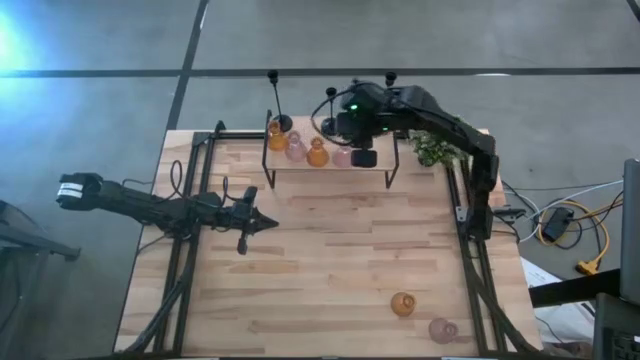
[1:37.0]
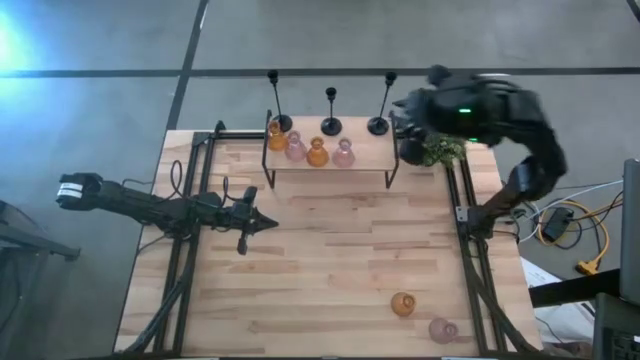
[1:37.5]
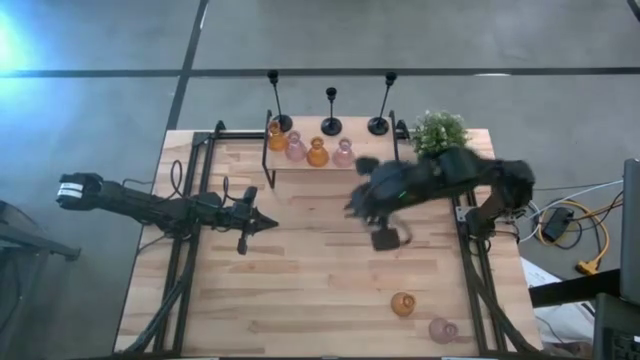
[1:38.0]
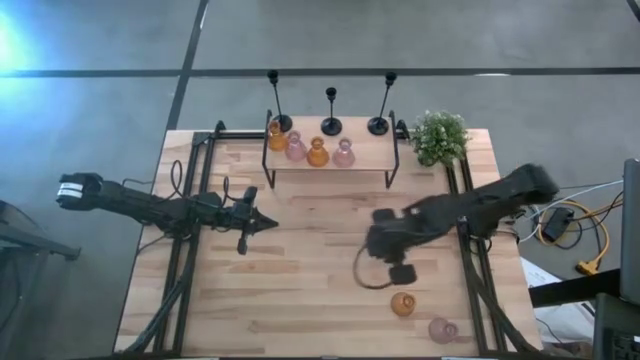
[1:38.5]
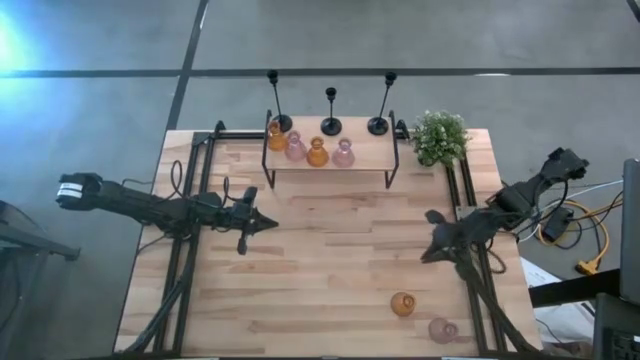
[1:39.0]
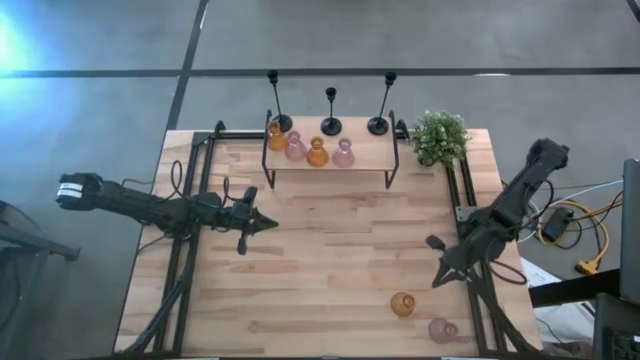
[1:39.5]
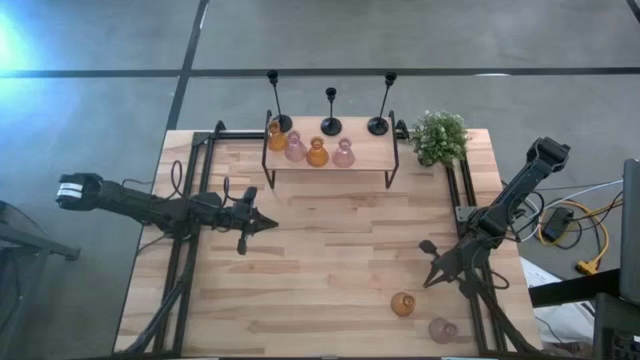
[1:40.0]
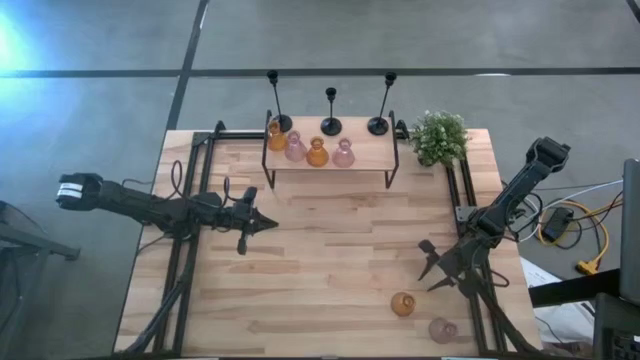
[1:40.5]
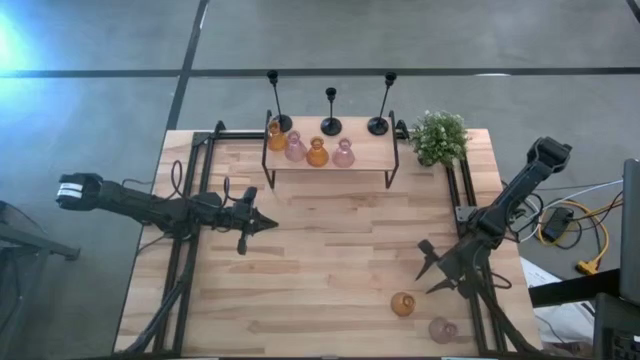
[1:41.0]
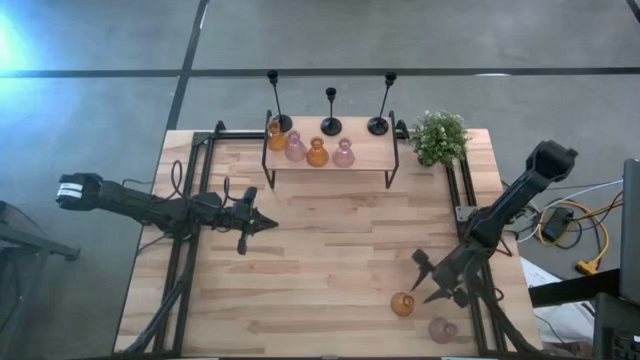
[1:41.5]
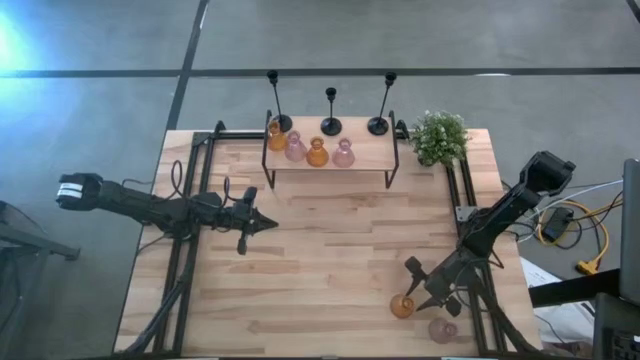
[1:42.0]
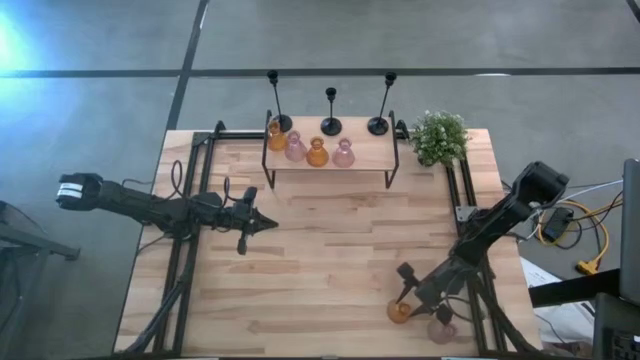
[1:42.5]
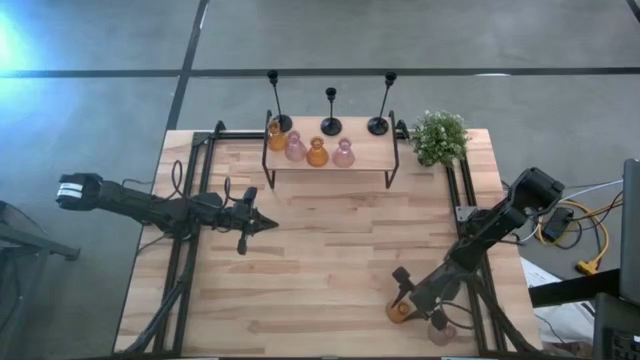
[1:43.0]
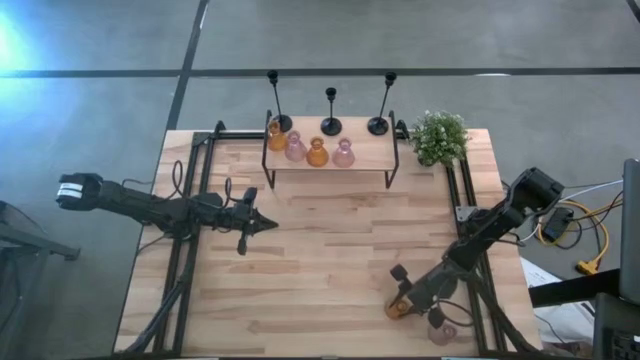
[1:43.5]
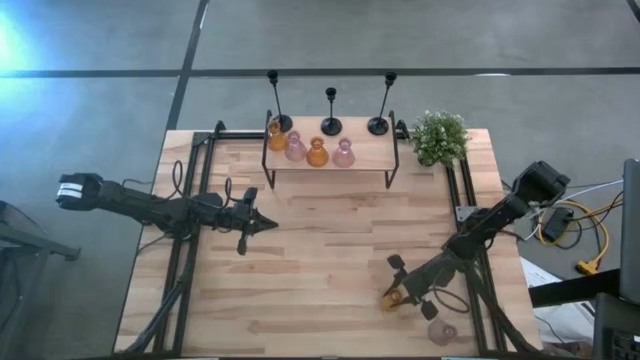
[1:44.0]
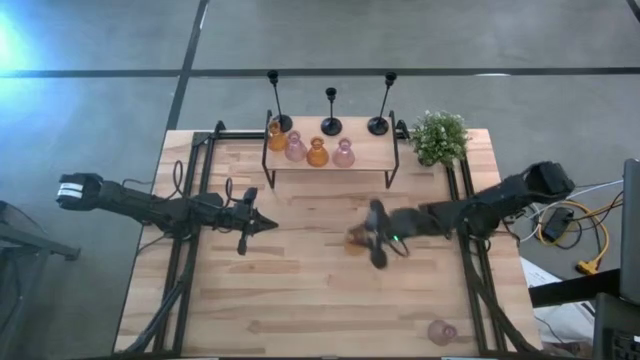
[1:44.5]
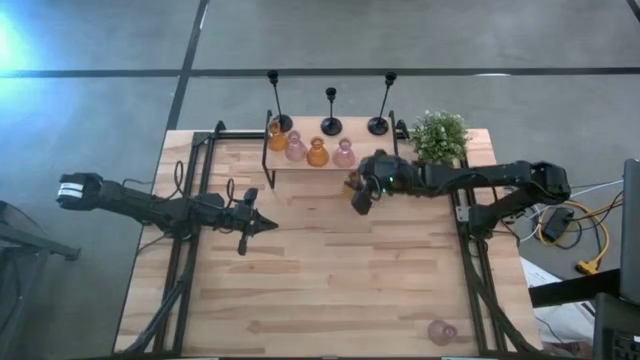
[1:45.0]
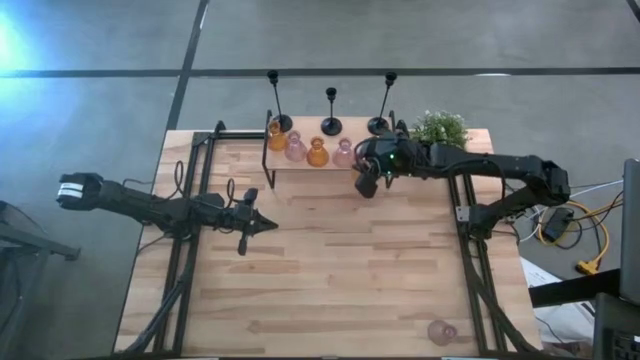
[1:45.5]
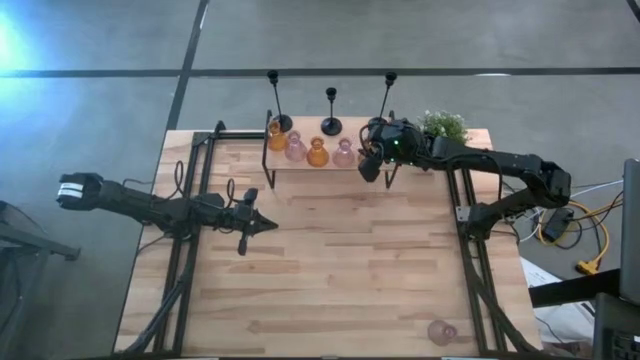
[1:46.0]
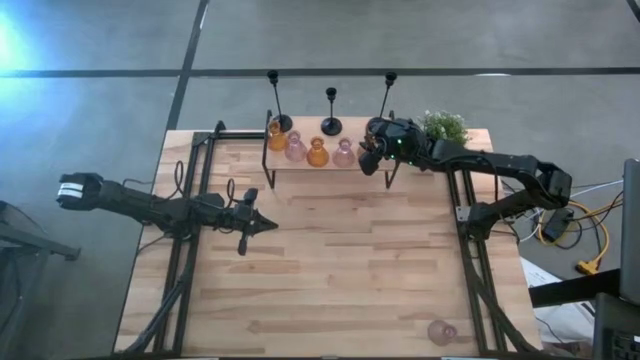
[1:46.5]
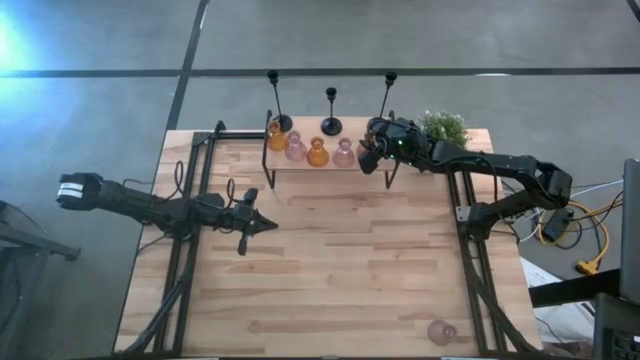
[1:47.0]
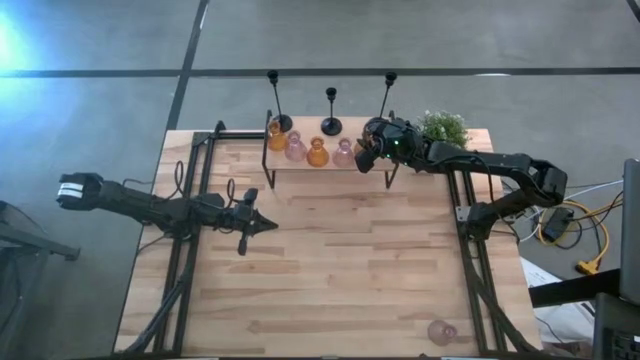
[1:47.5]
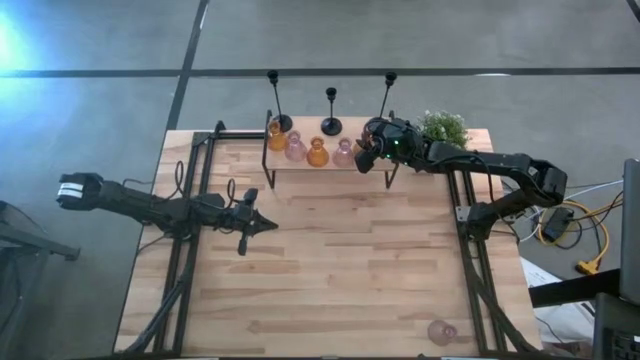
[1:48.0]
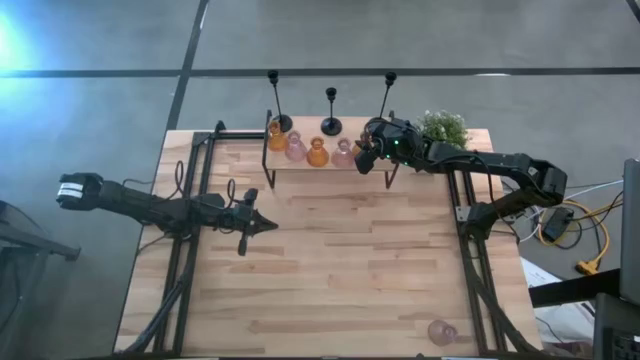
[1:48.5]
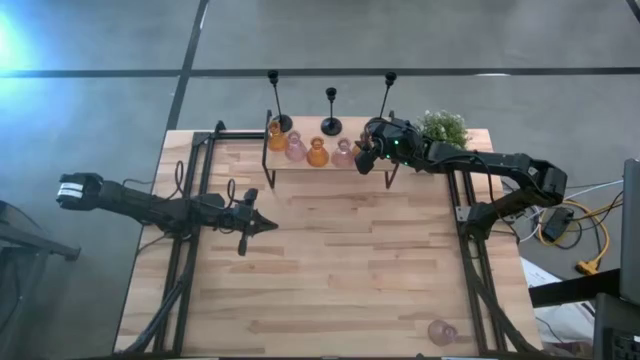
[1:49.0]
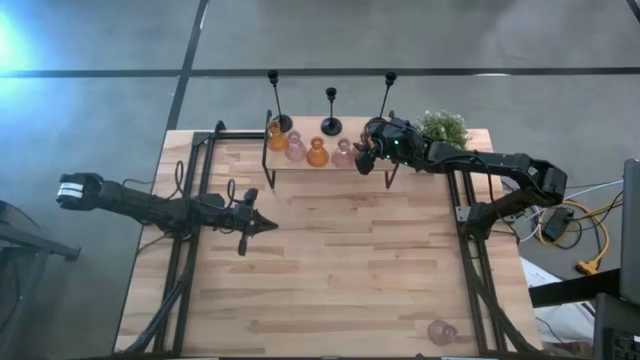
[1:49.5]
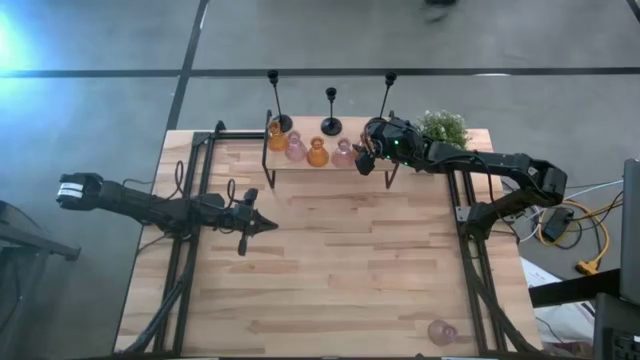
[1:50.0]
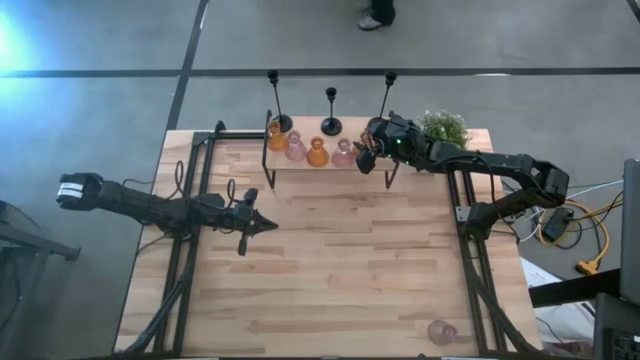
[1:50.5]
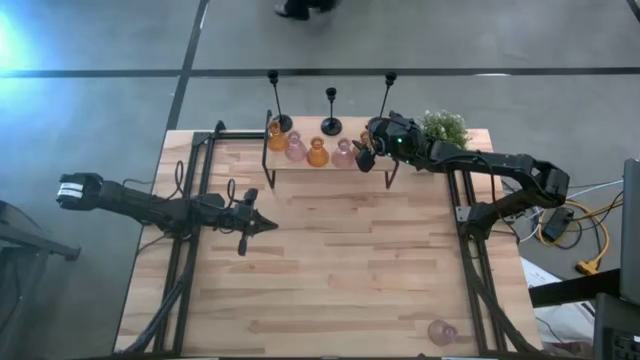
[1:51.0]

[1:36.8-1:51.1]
Task: Pick & Place candle stick holders
Put the orange glass candle holder on the shelf

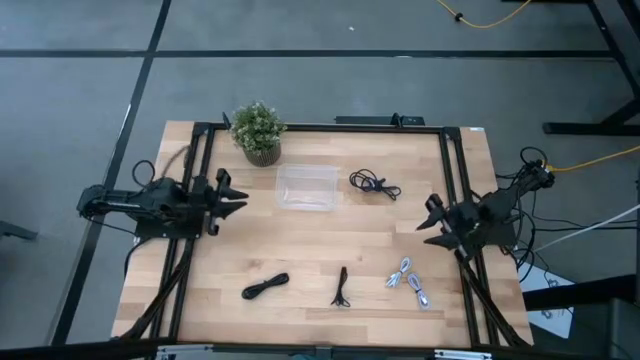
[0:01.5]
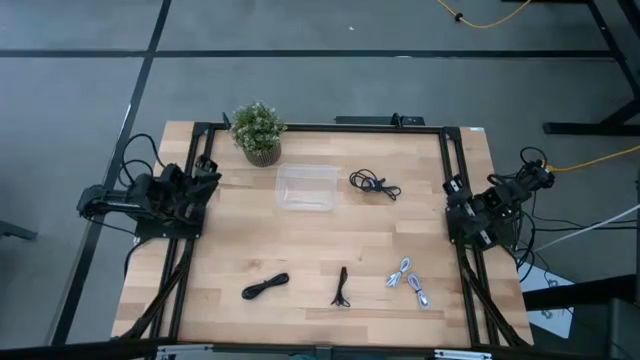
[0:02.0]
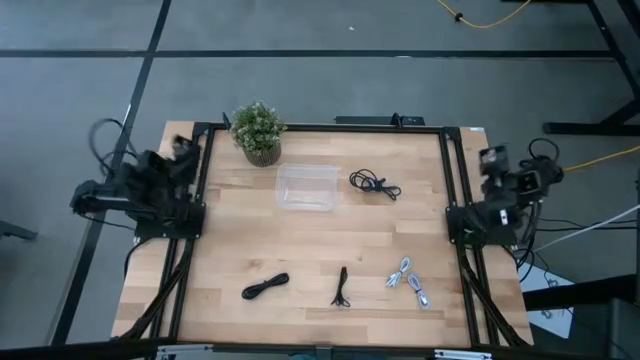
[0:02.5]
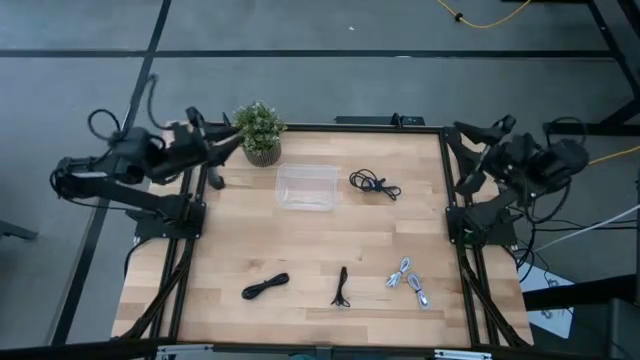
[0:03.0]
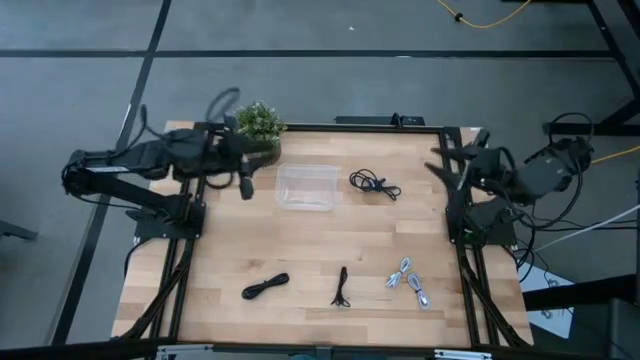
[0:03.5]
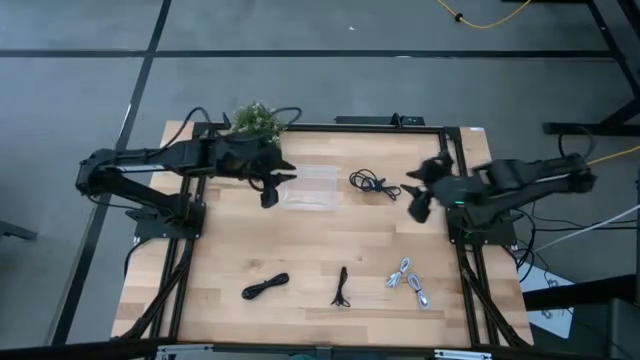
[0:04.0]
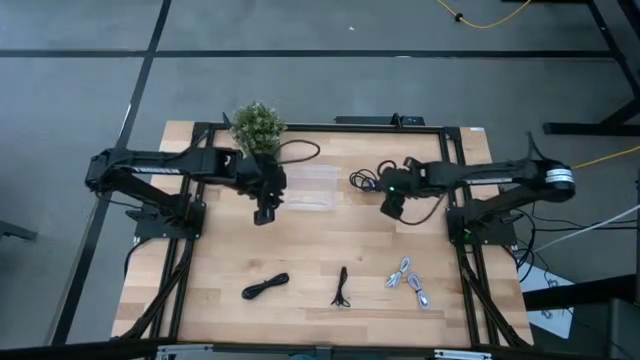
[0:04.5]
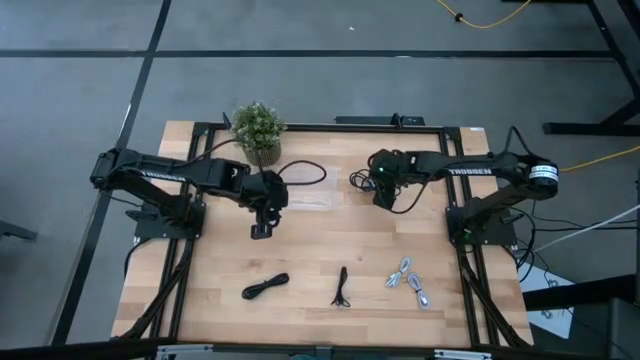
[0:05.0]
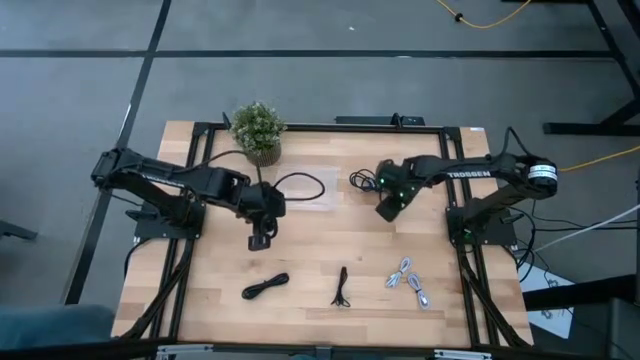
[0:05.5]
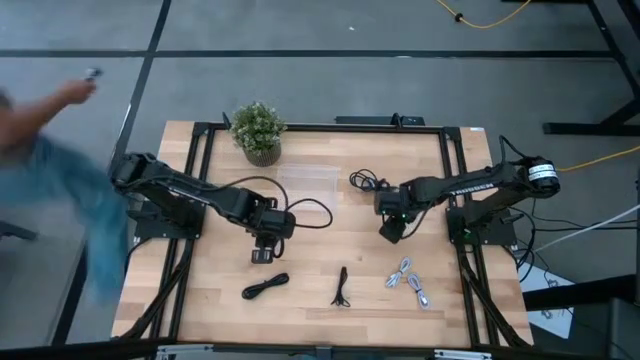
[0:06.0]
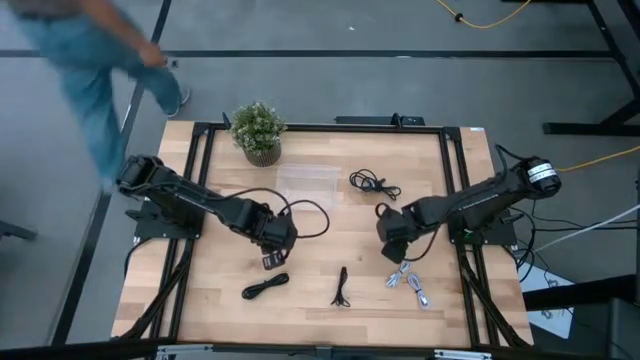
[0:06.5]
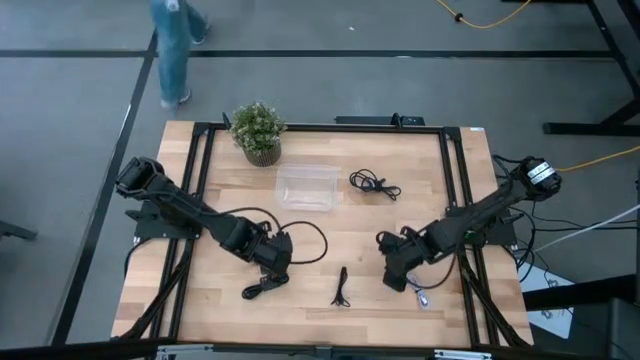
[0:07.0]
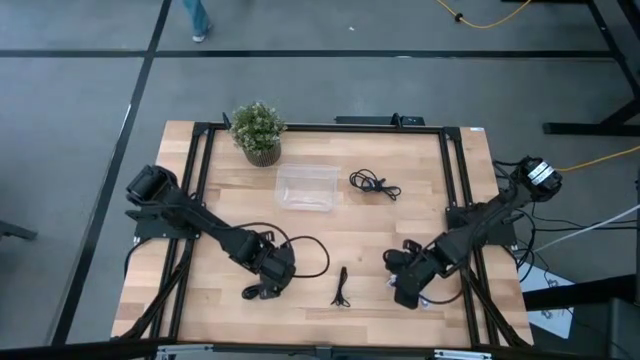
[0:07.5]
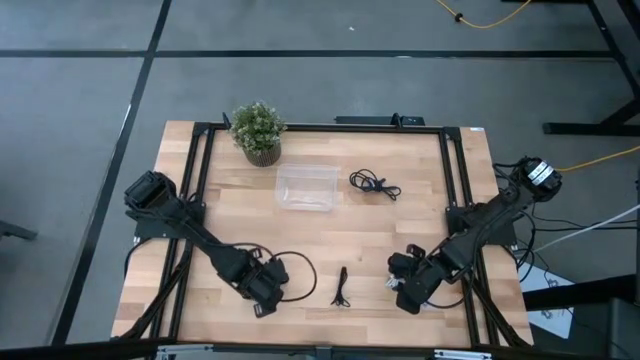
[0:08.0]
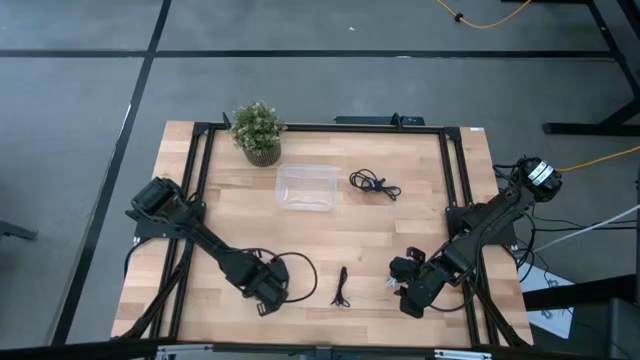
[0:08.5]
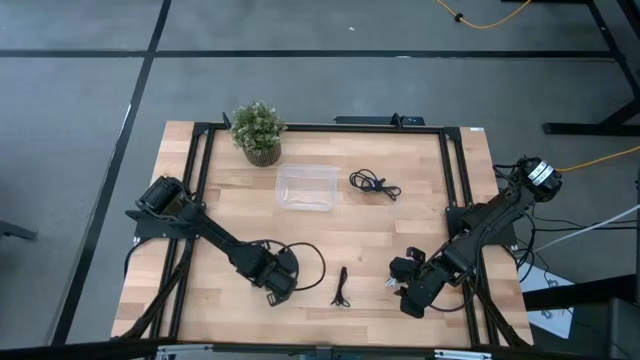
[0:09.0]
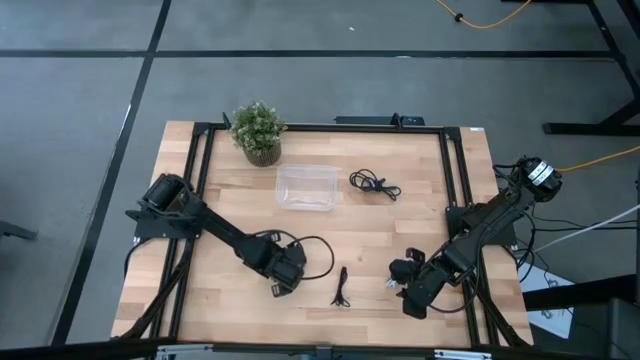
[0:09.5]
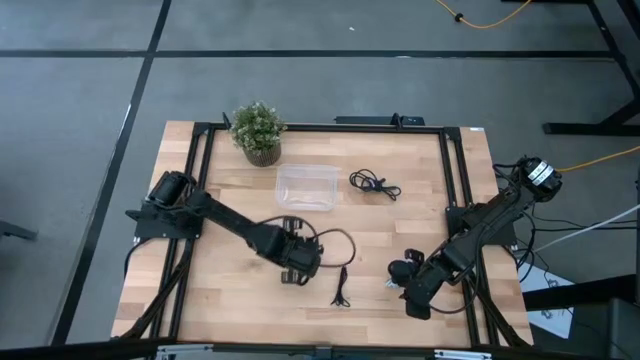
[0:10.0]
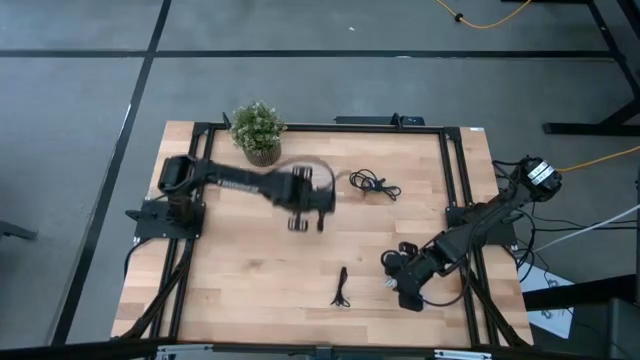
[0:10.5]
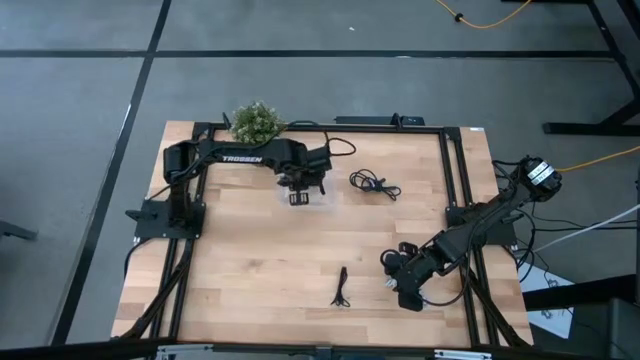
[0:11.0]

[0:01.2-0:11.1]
Task: Pick and place USB-C Cables
Put the left black charger cable into the transparent bin
